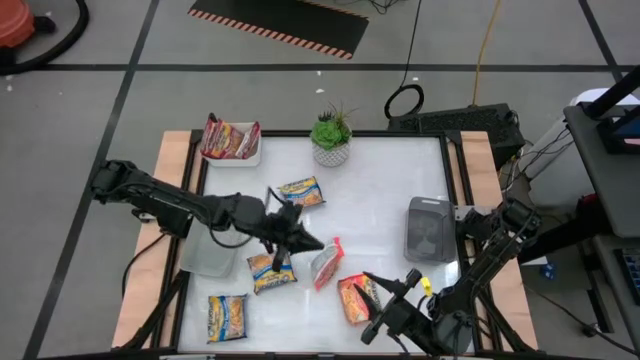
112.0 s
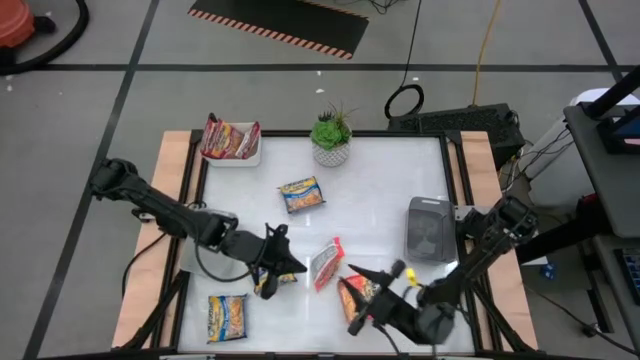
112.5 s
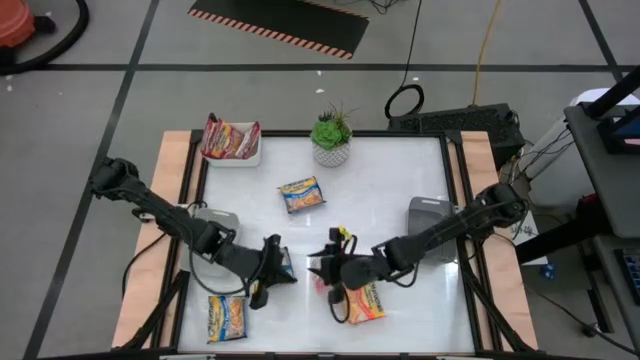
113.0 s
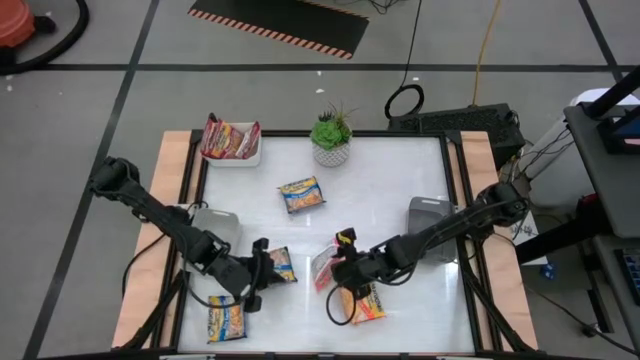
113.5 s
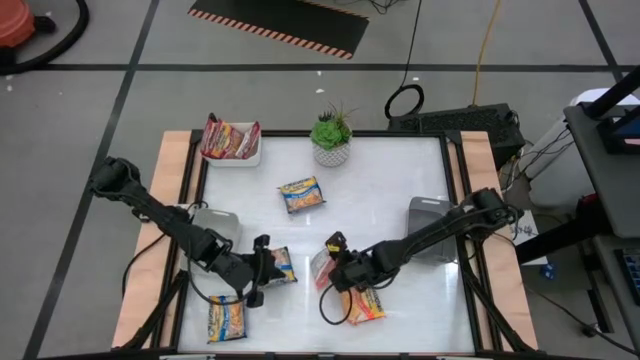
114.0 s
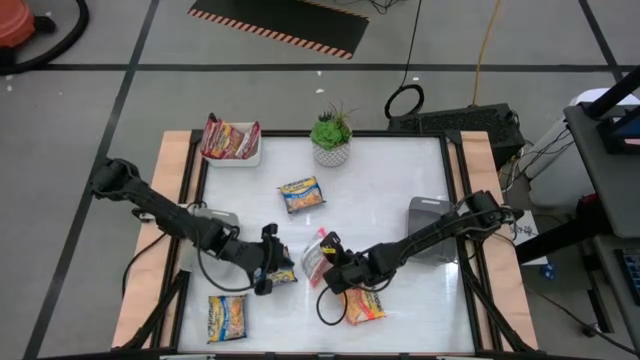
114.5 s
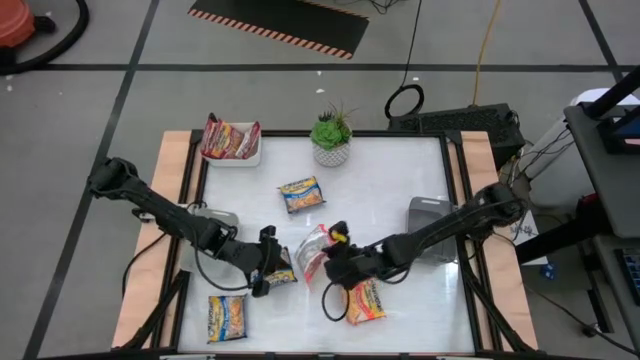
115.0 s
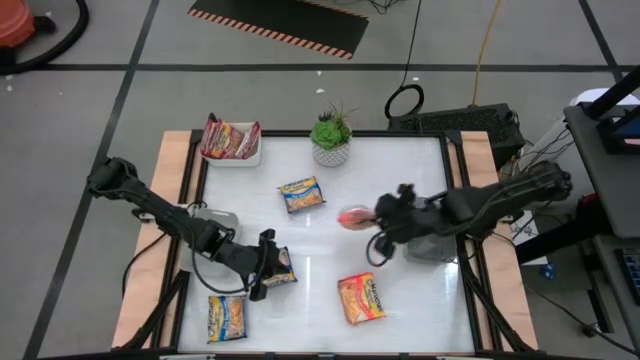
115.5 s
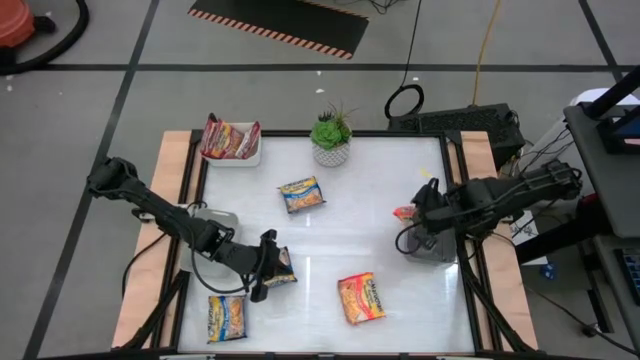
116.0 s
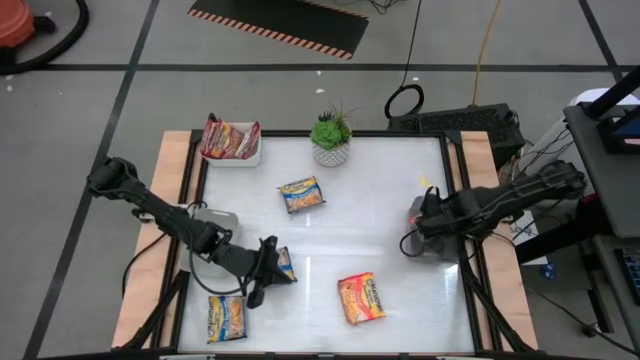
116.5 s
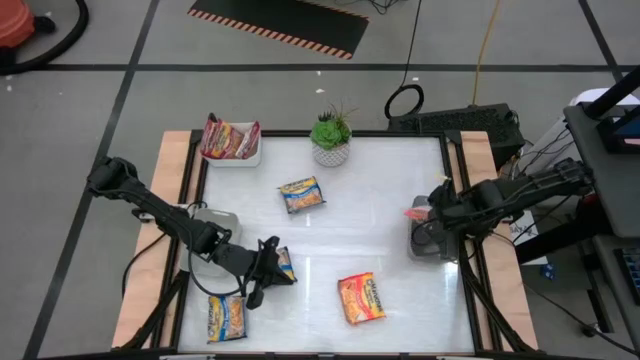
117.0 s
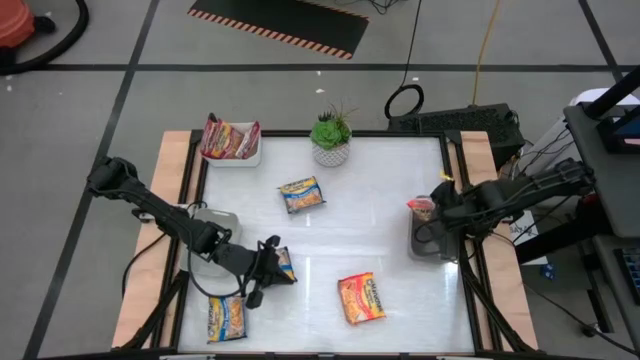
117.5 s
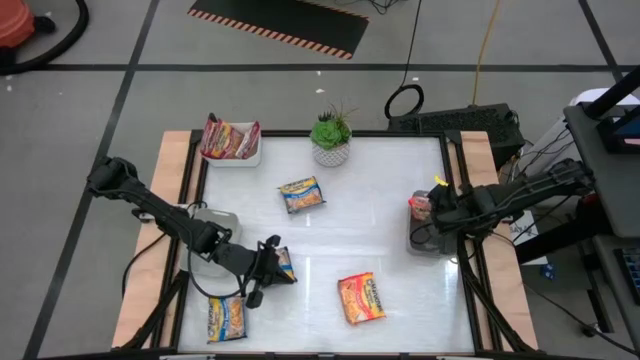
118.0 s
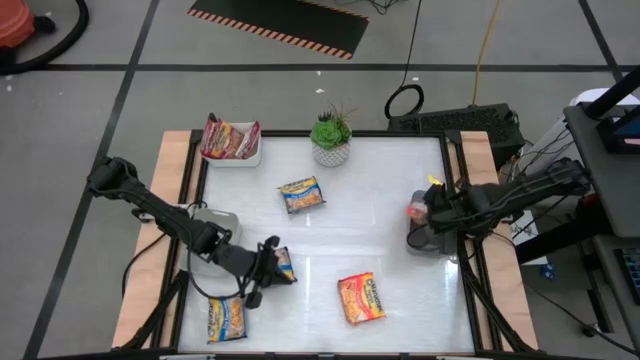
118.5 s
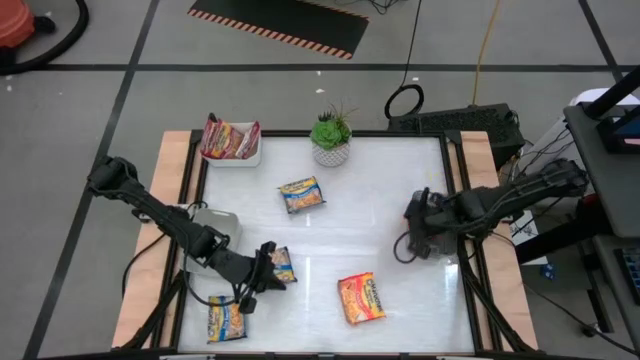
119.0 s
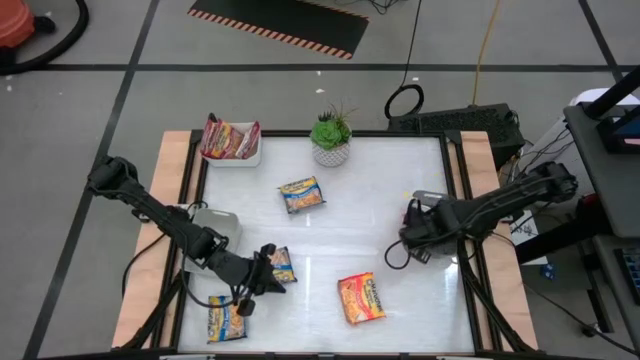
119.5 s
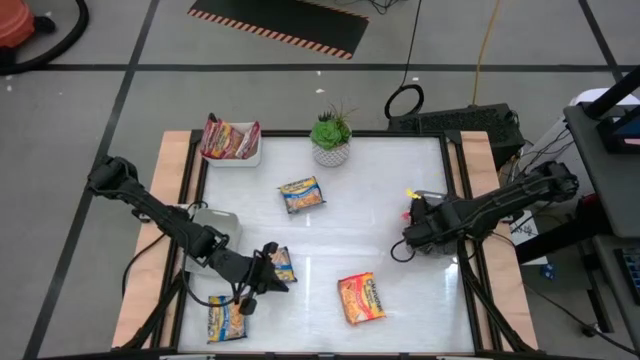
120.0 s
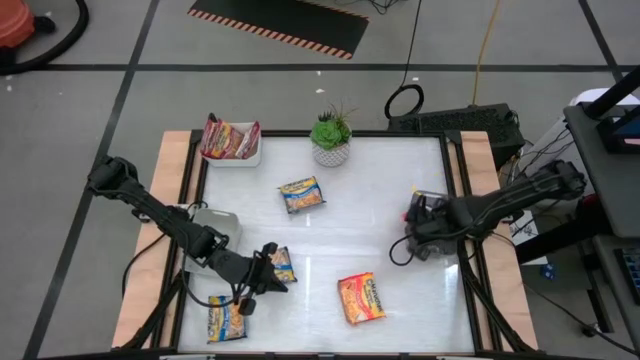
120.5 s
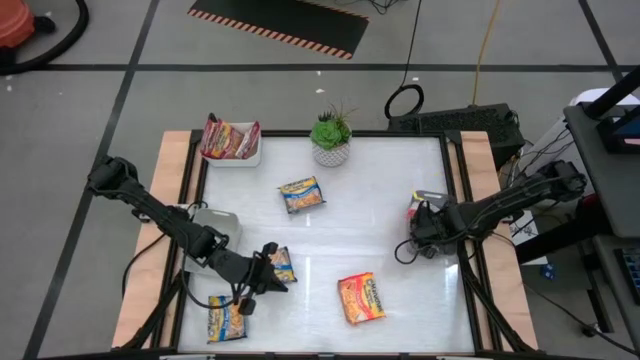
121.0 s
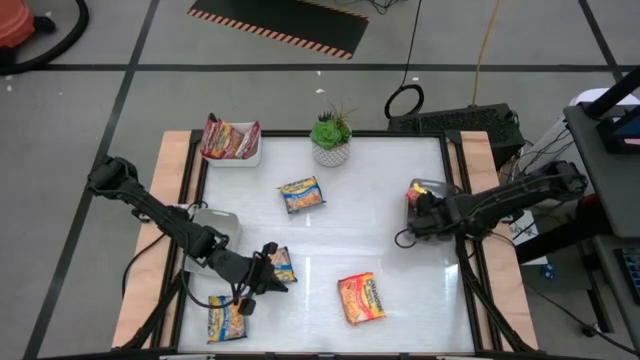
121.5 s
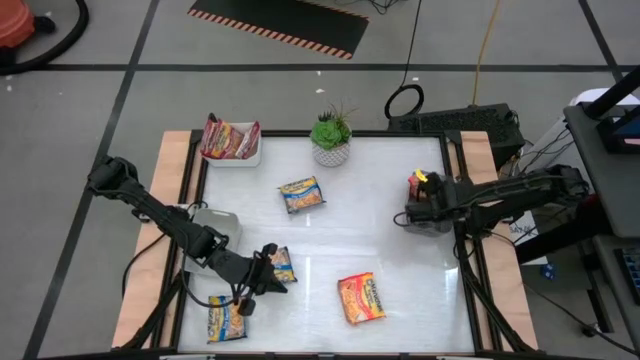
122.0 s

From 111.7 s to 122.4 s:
Task: Sort Maruchan noodles
Put the top orange noodle pack into the black bin

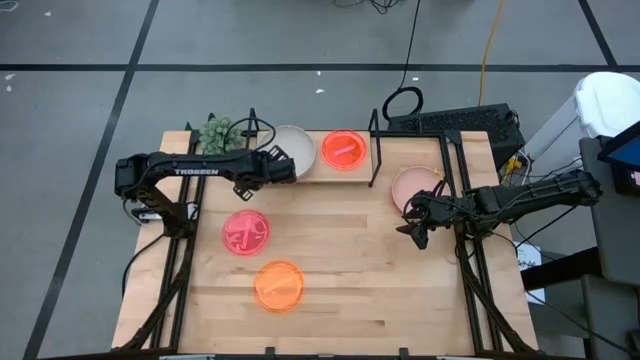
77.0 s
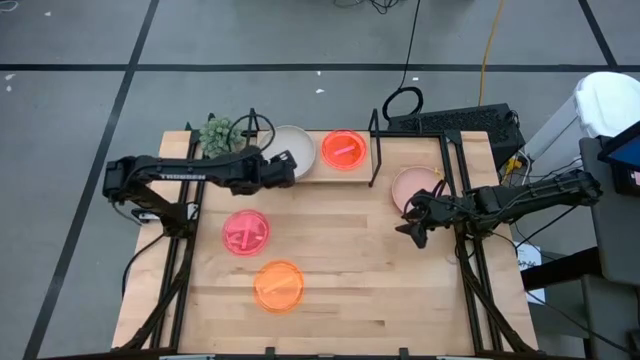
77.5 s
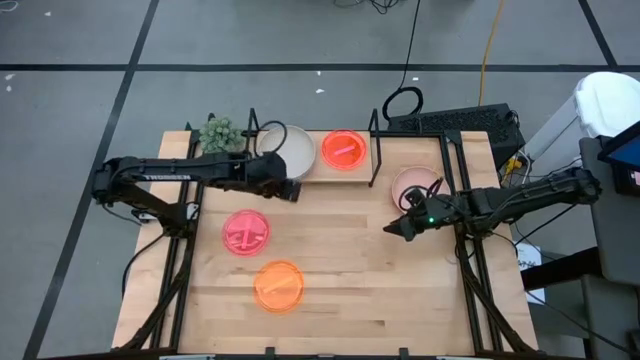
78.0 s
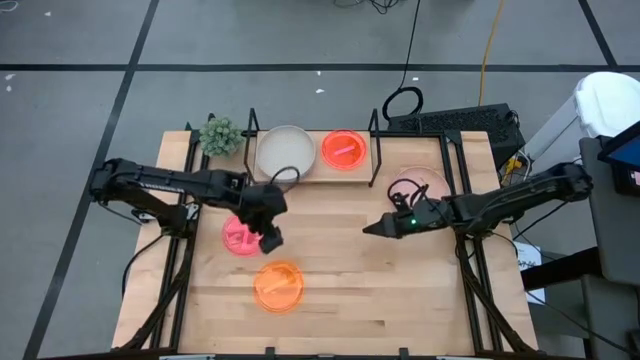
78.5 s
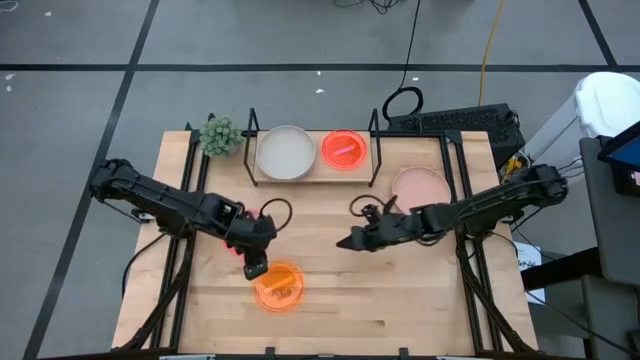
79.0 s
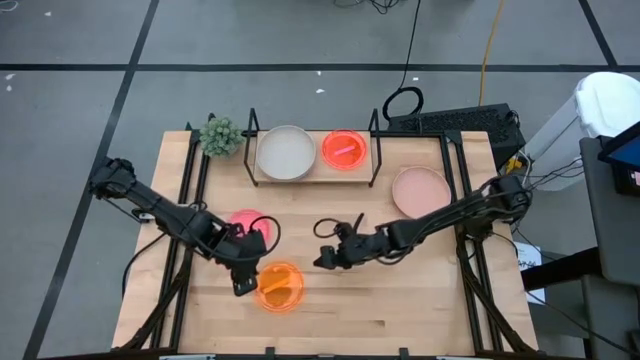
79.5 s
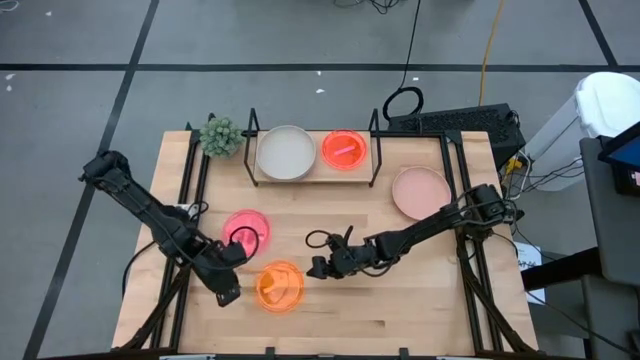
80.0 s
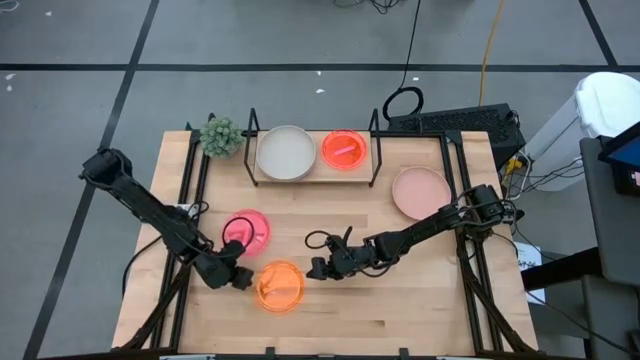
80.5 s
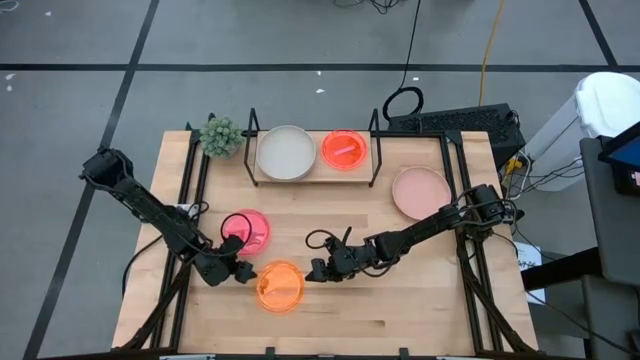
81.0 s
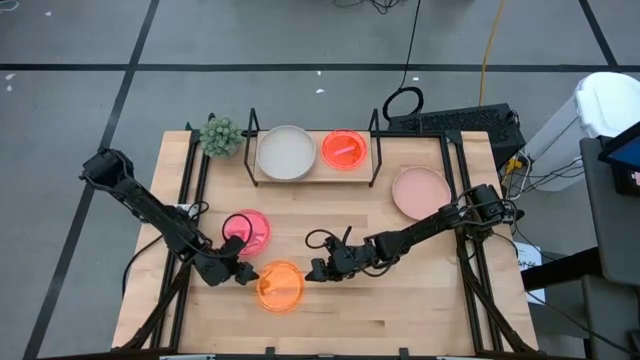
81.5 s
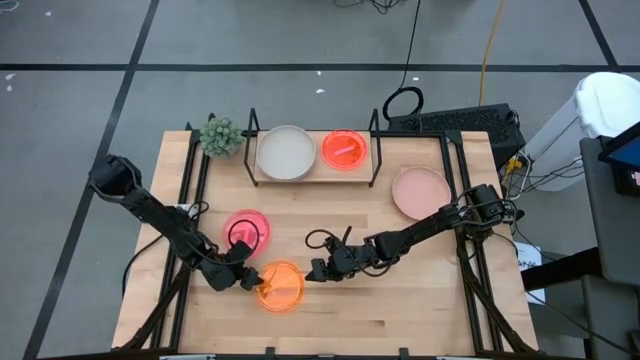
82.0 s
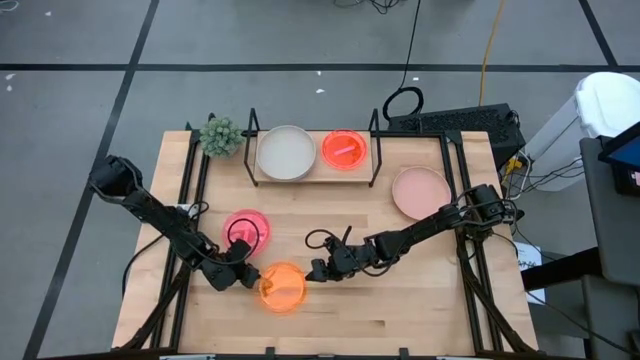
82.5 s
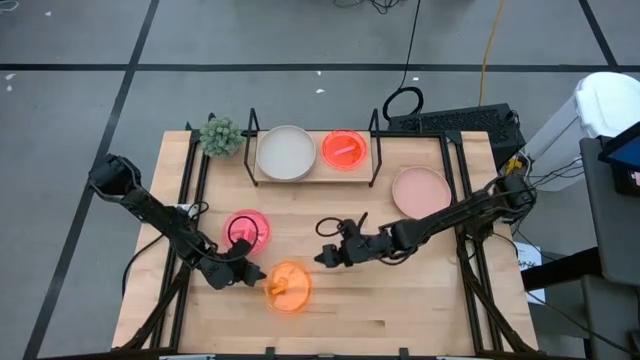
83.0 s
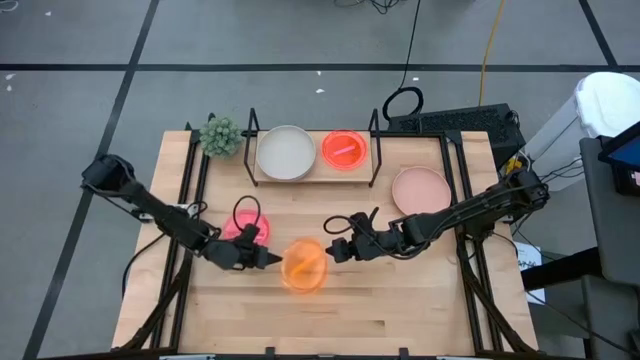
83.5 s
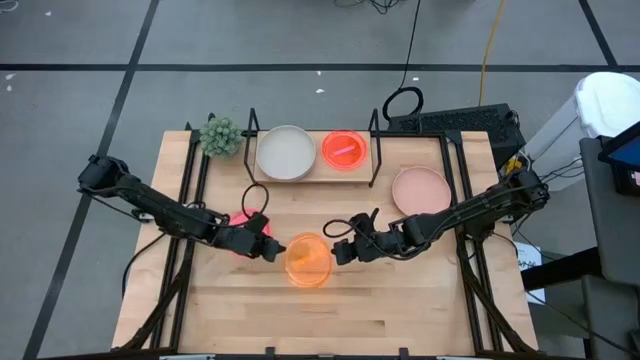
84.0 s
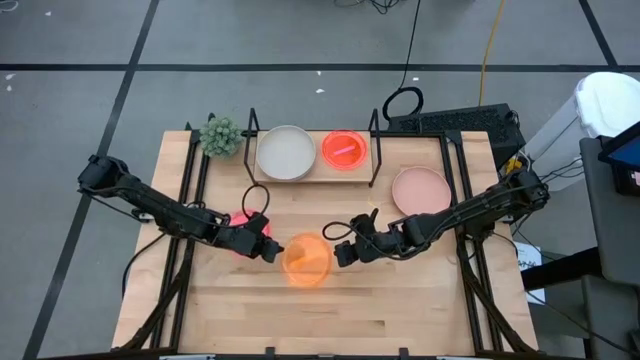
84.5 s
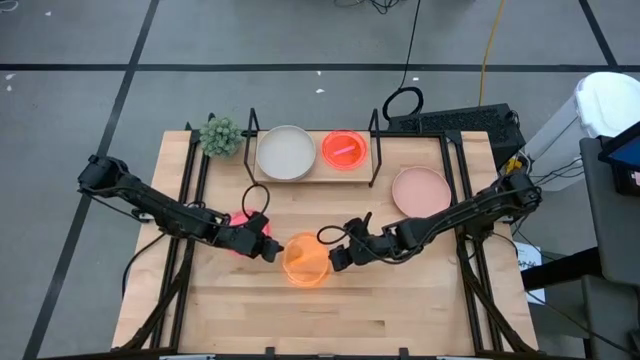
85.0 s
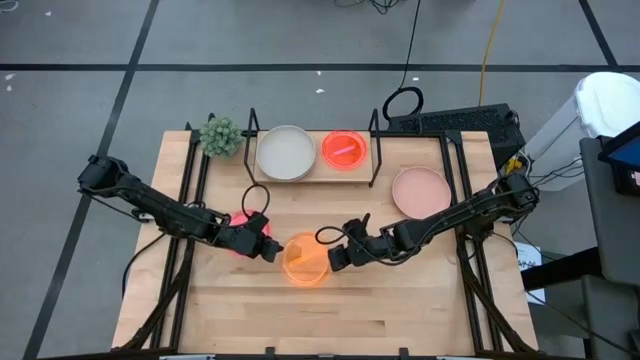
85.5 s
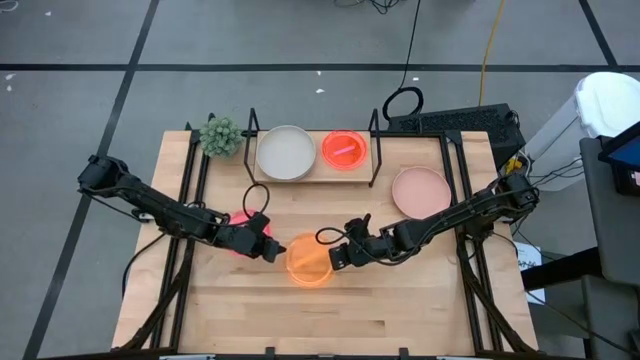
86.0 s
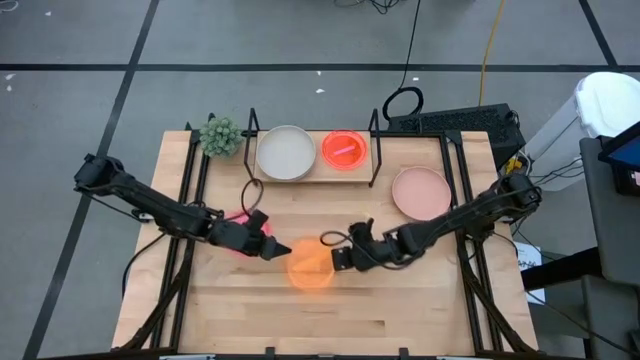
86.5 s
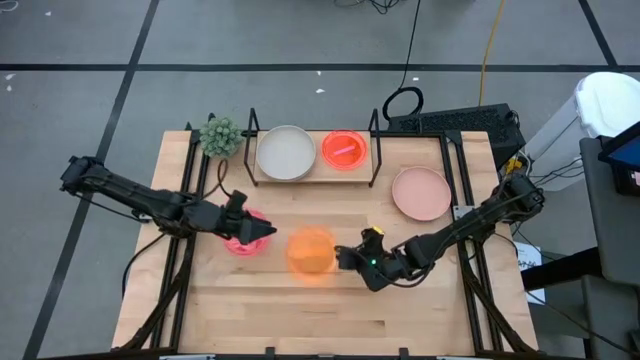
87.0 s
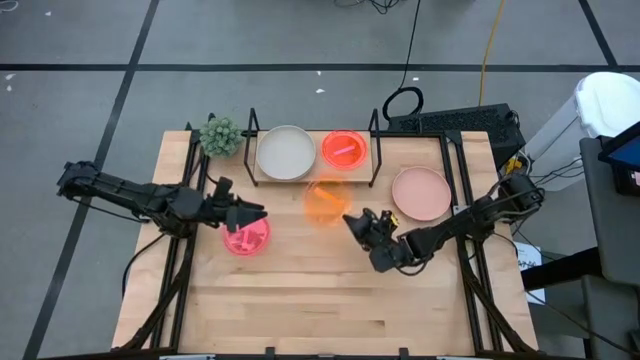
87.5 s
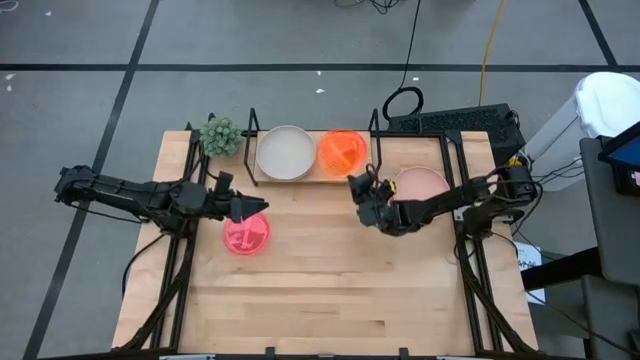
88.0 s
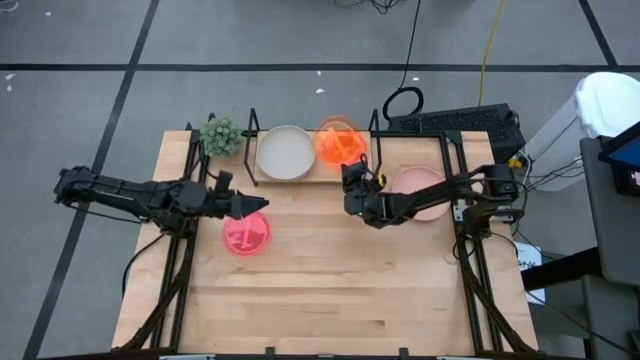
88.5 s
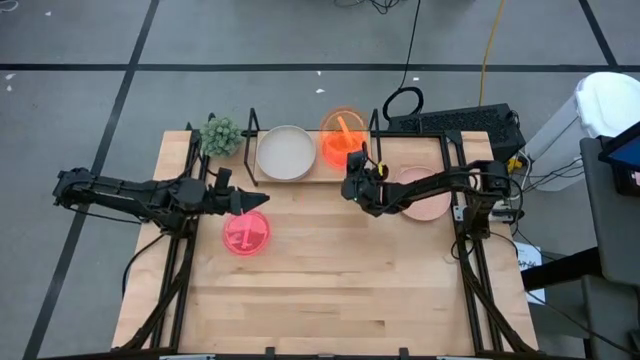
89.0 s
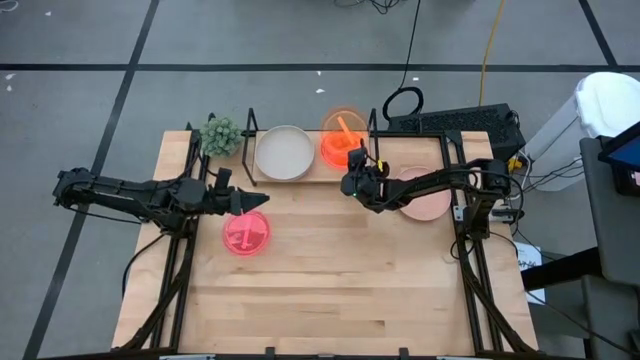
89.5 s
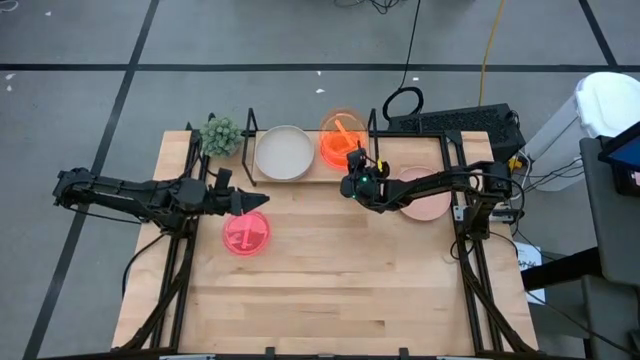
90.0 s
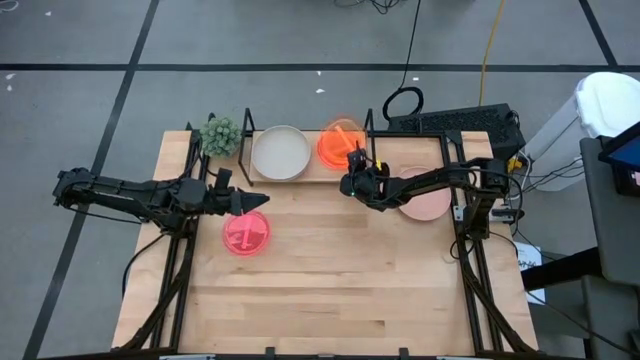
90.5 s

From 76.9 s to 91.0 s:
Task: Place and stack plates onto a shelf
Stack the orange transparent plate on the pink transparent plate on the shelf
